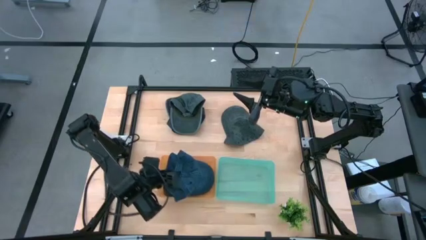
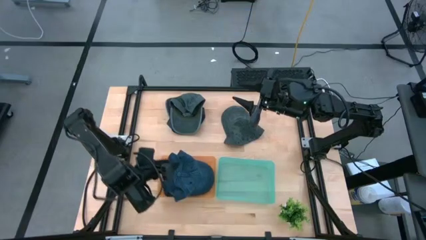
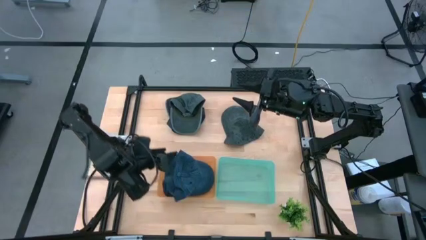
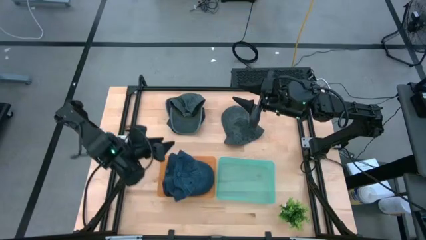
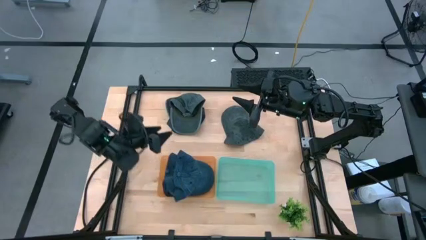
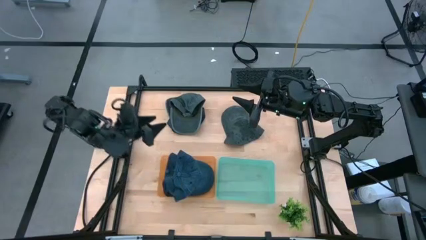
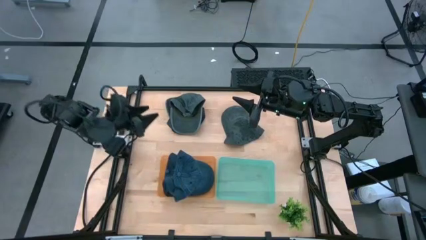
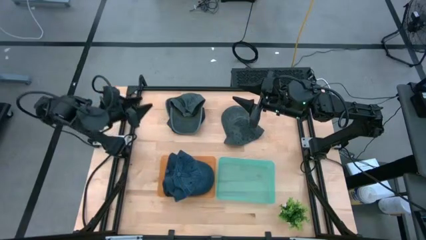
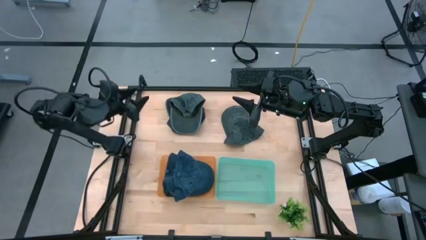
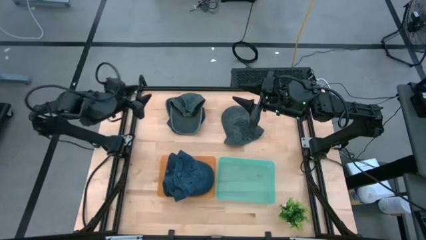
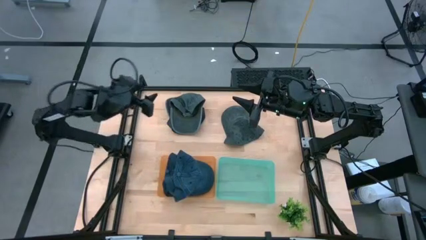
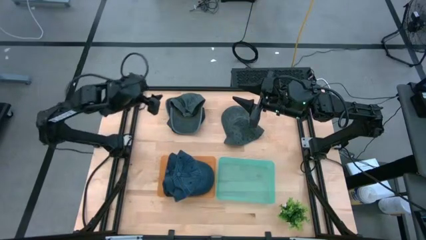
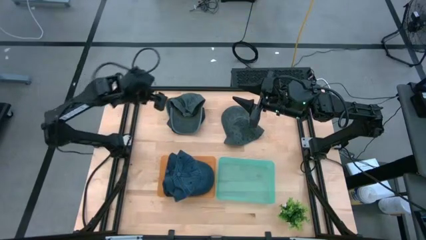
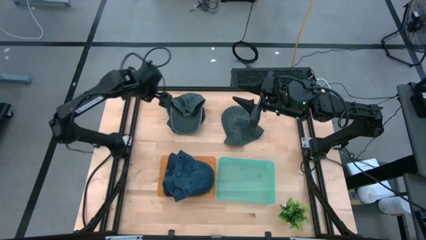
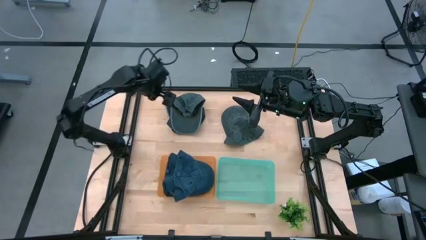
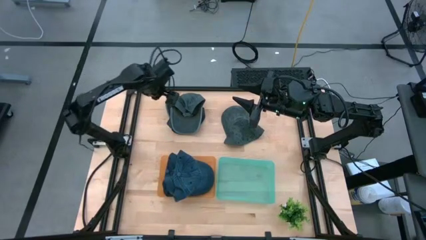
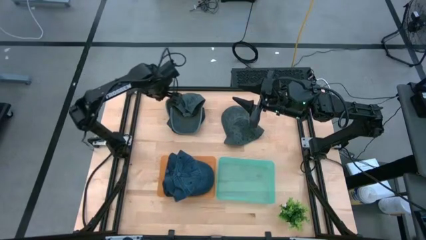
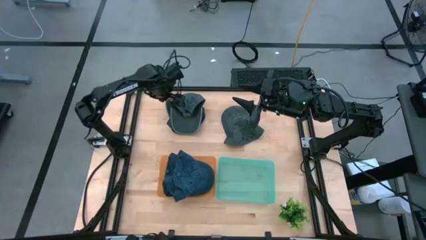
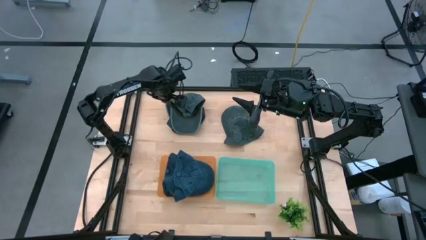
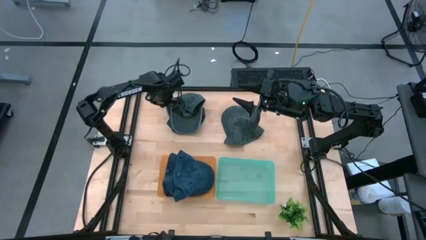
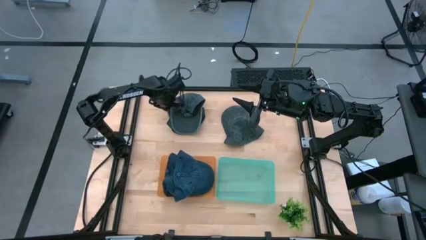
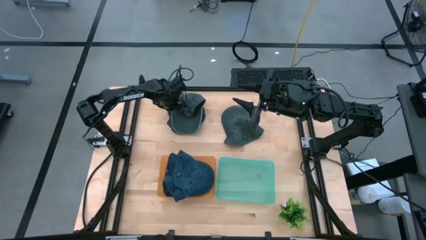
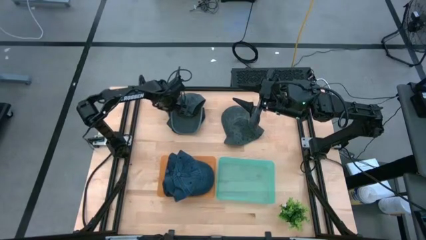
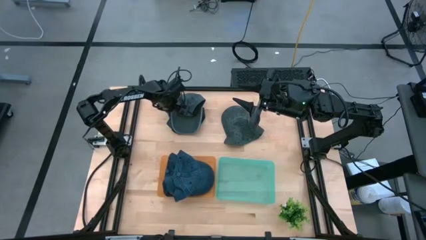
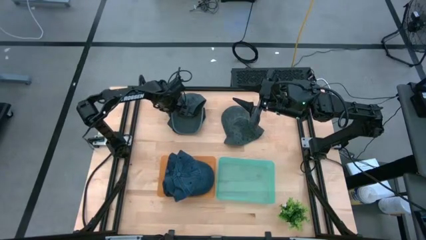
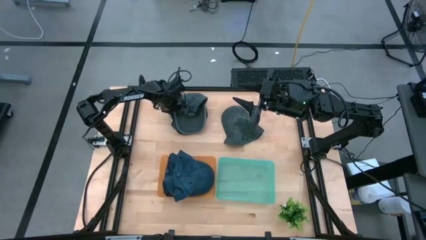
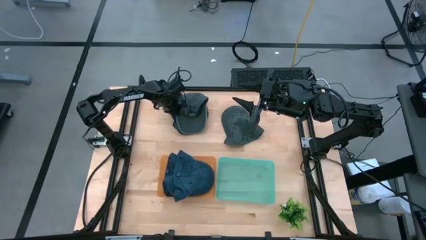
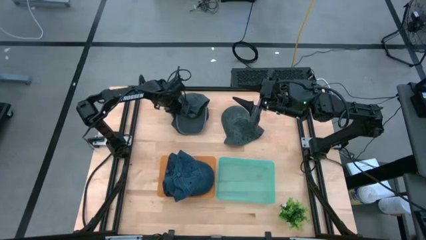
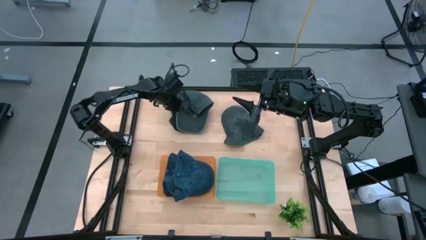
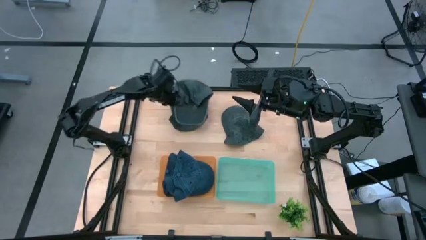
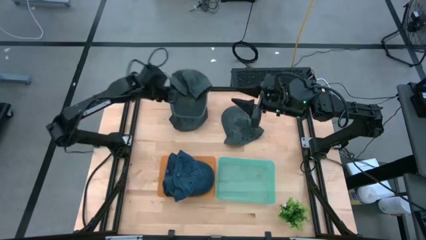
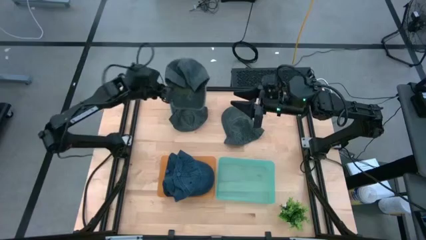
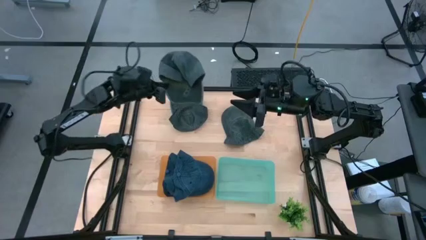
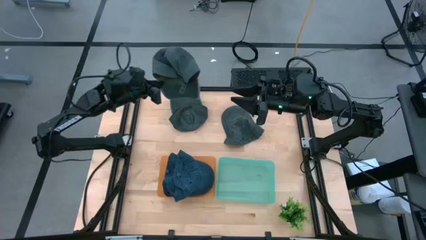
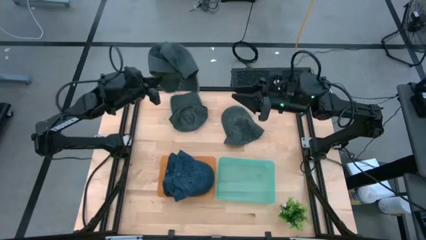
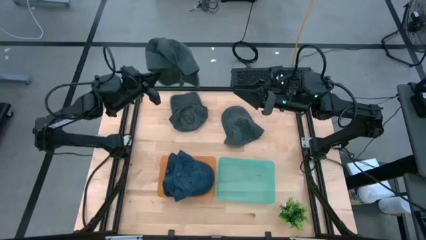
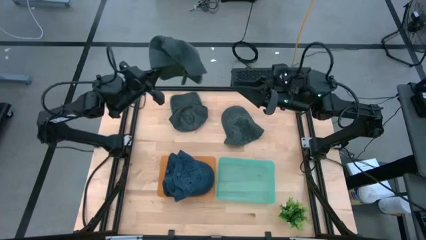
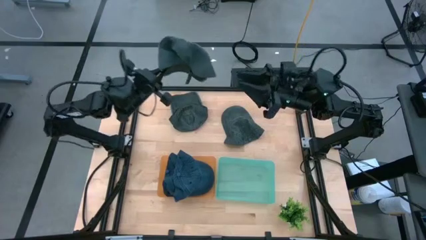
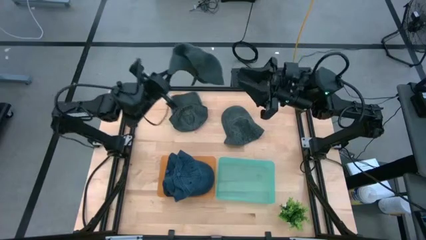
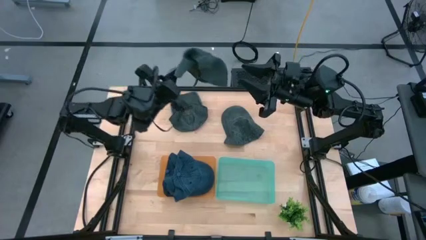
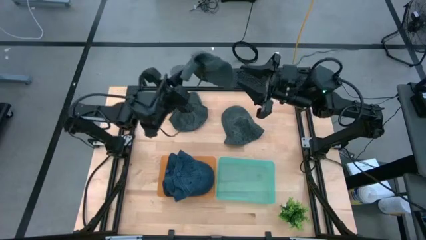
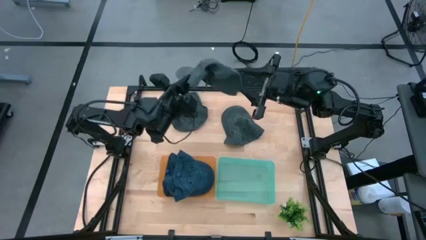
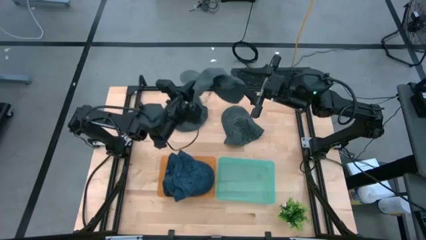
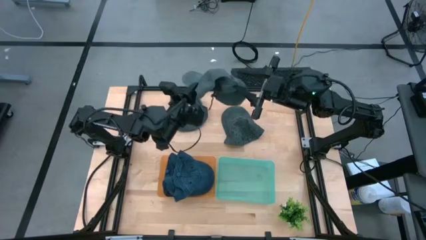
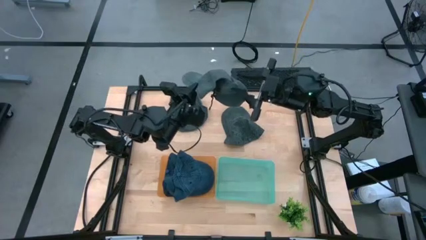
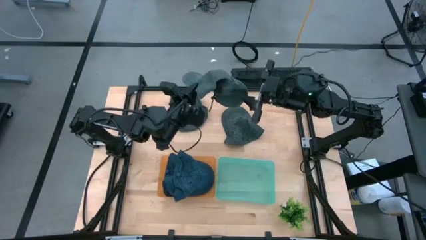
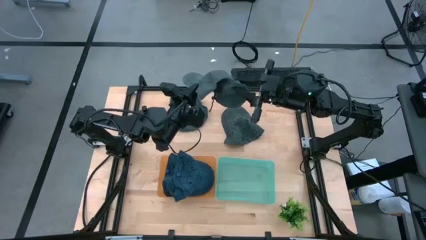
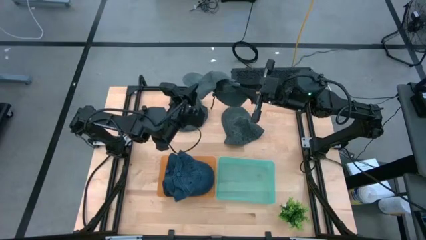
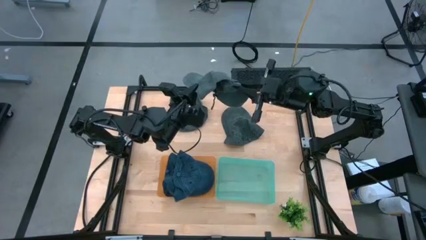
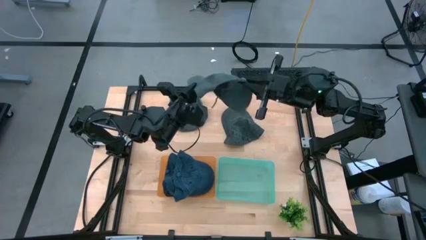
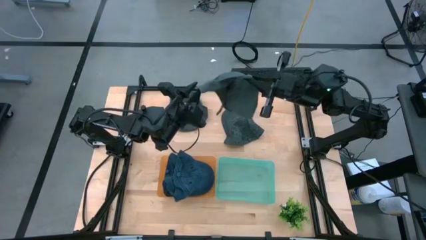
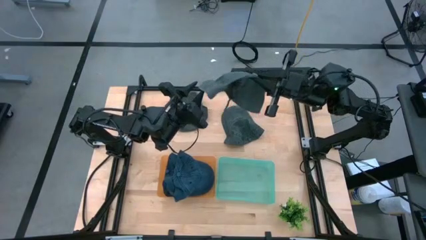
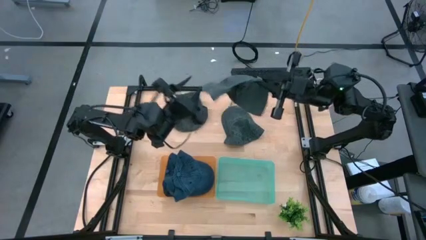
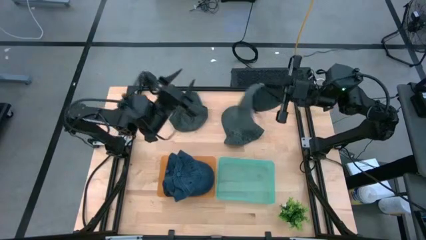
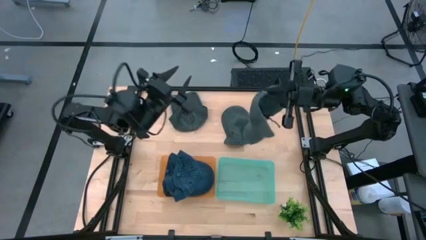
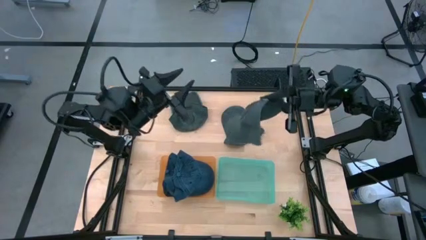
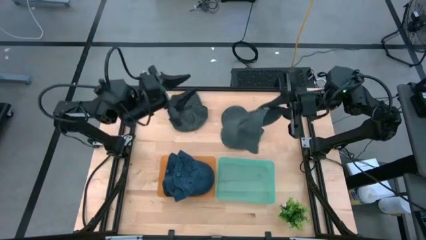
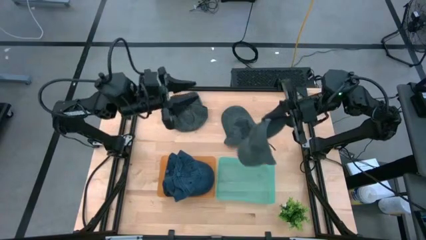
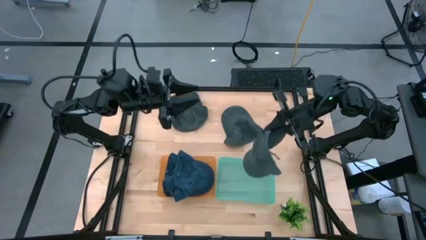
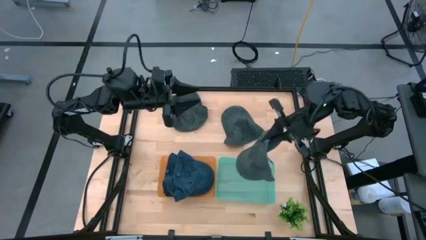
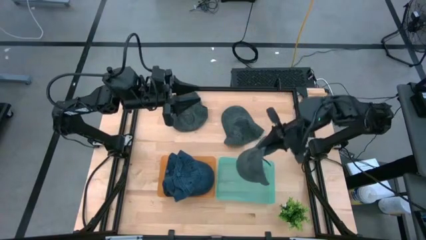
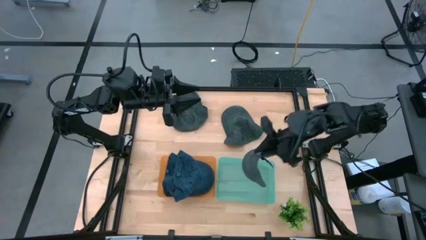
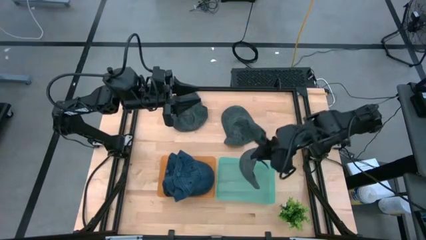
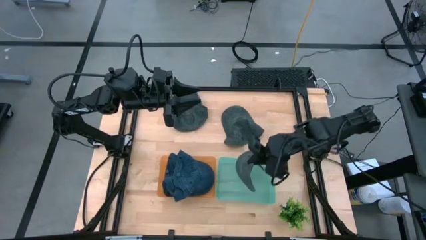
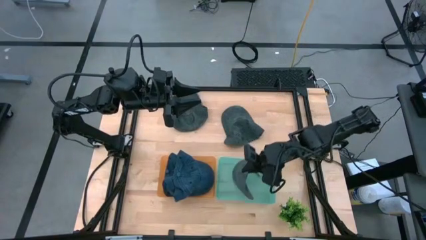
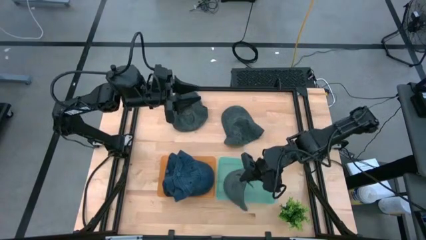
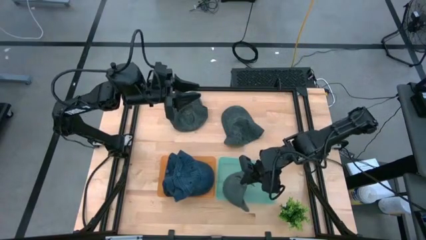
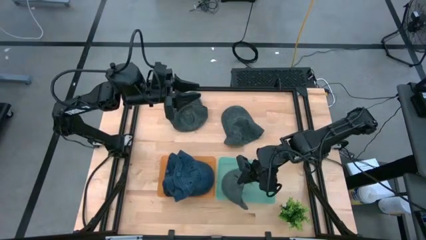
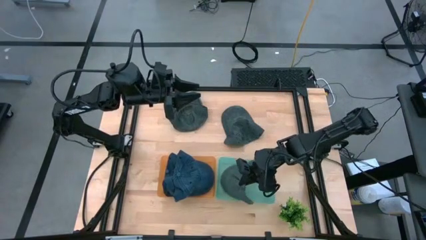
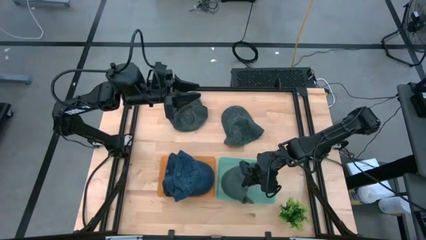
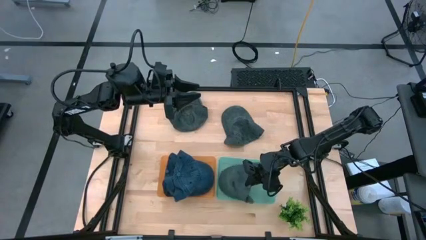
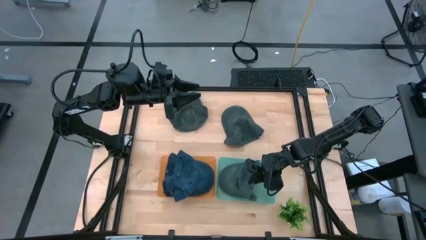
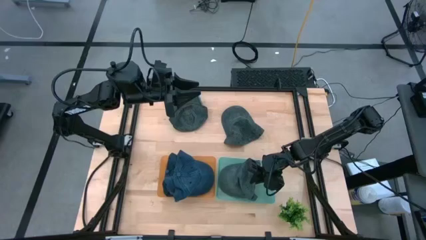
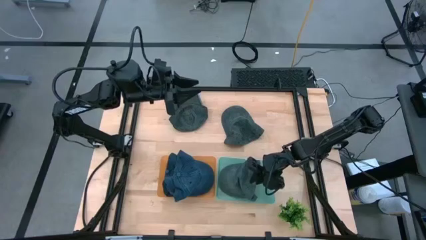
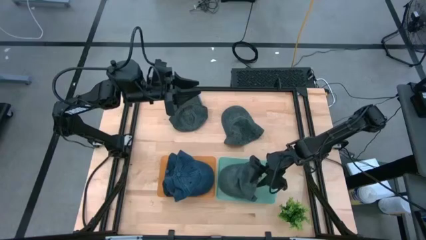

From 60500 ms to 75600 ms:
Task: Pick & Place hat
Put the top left gray cap into the blue green bin
